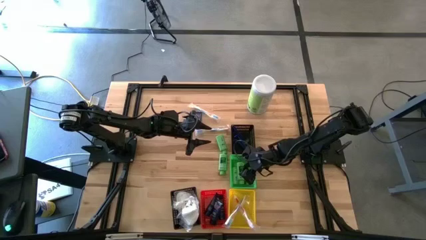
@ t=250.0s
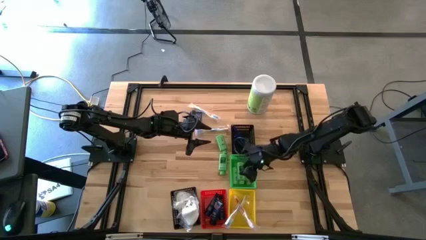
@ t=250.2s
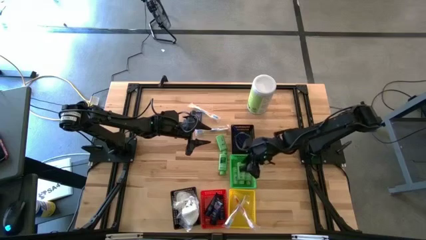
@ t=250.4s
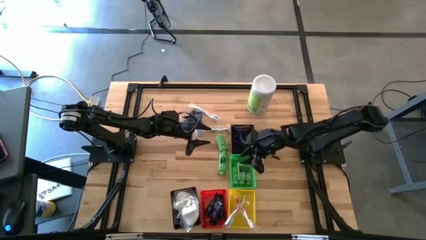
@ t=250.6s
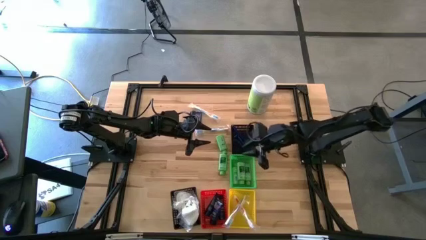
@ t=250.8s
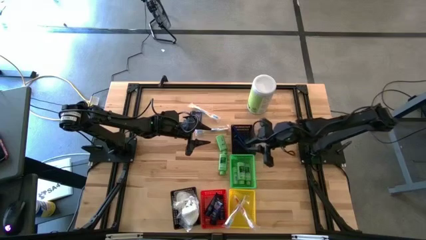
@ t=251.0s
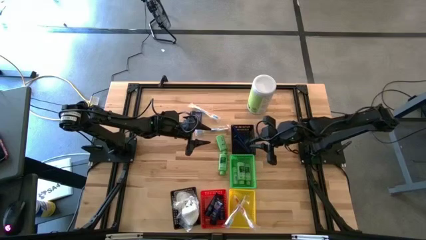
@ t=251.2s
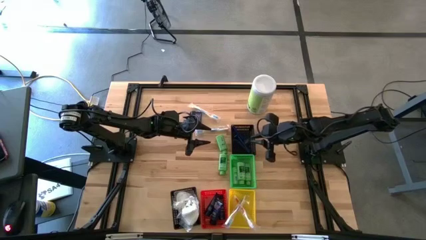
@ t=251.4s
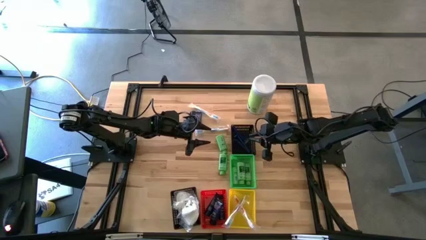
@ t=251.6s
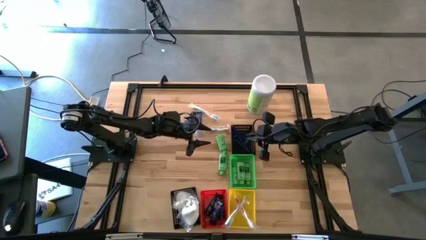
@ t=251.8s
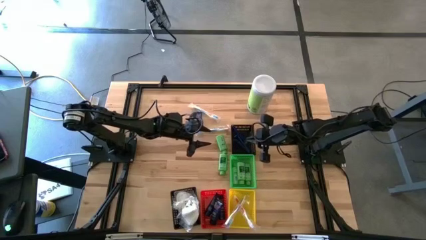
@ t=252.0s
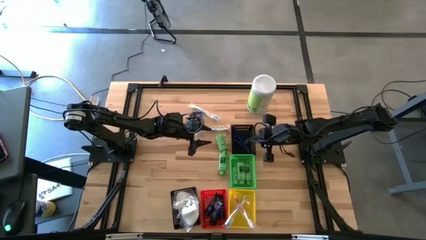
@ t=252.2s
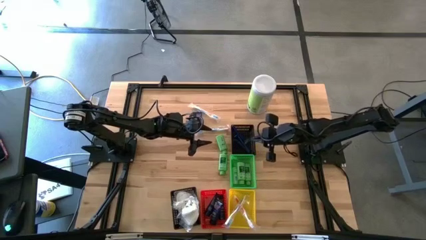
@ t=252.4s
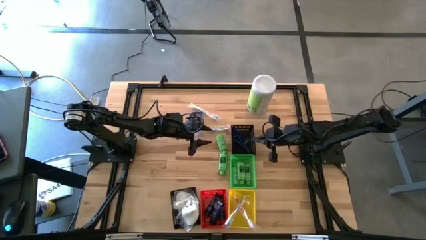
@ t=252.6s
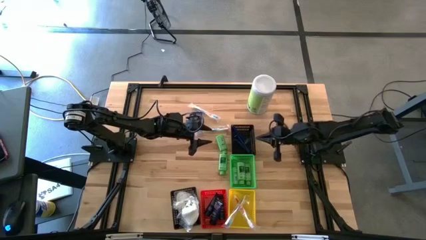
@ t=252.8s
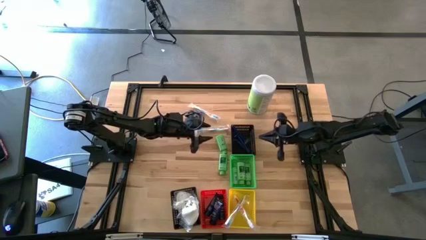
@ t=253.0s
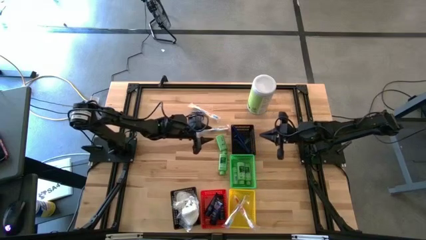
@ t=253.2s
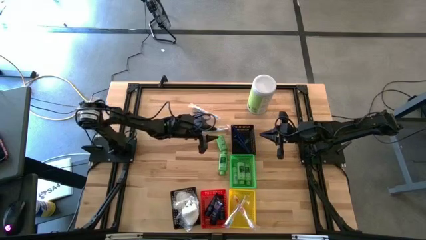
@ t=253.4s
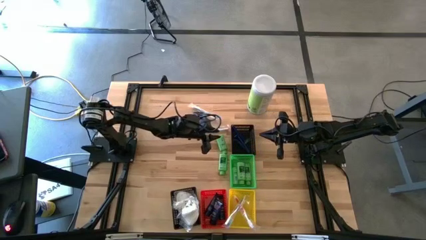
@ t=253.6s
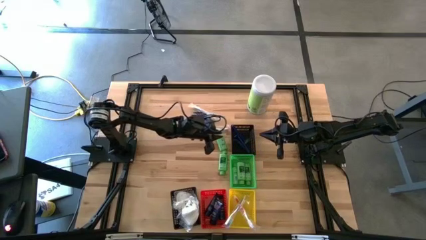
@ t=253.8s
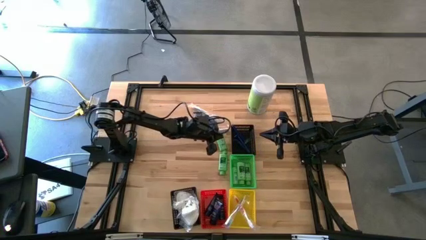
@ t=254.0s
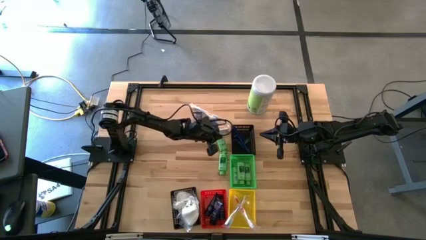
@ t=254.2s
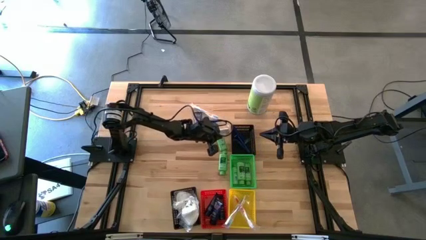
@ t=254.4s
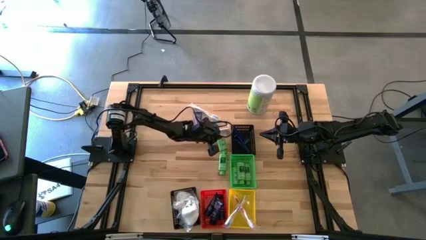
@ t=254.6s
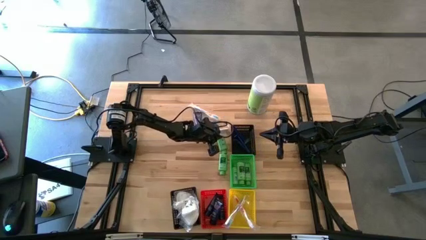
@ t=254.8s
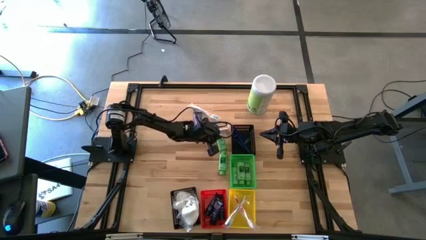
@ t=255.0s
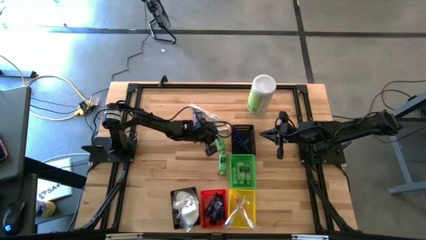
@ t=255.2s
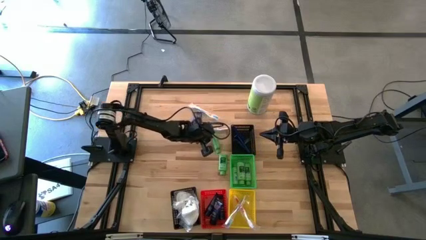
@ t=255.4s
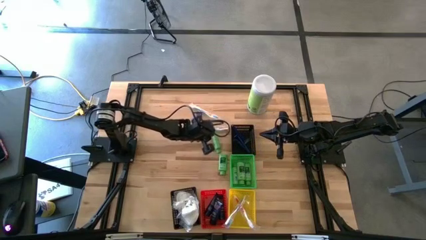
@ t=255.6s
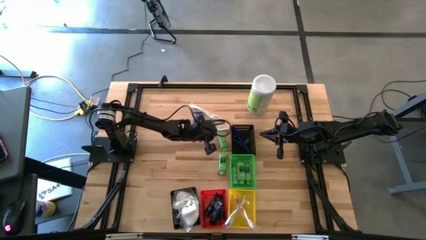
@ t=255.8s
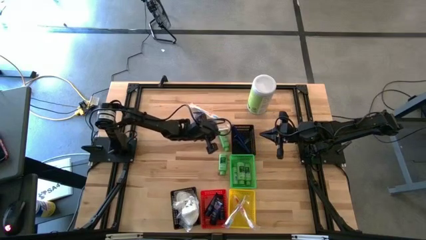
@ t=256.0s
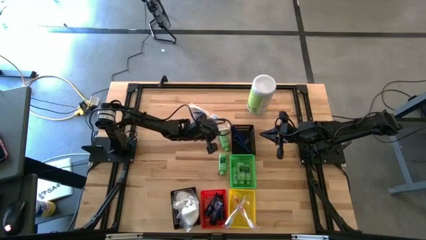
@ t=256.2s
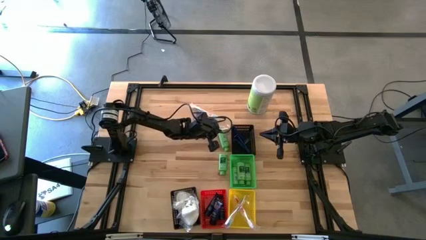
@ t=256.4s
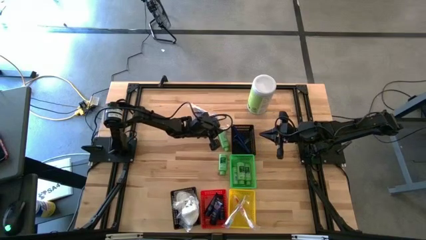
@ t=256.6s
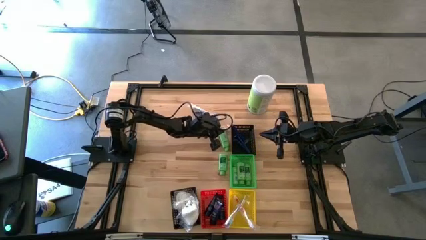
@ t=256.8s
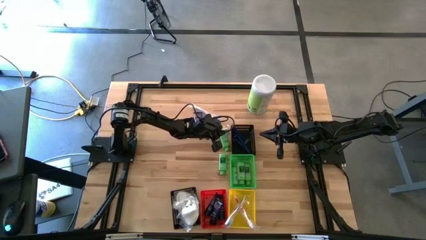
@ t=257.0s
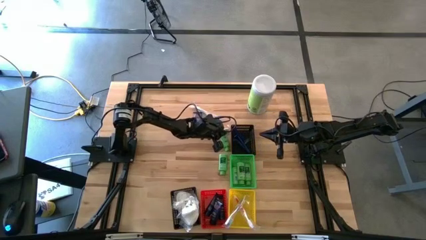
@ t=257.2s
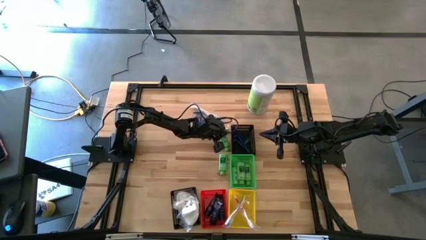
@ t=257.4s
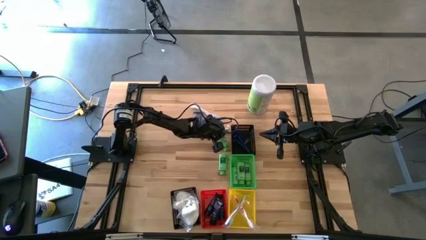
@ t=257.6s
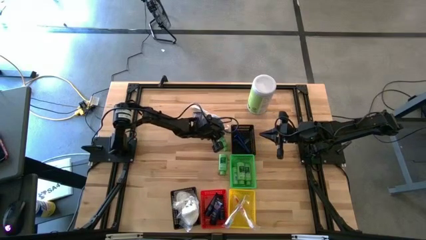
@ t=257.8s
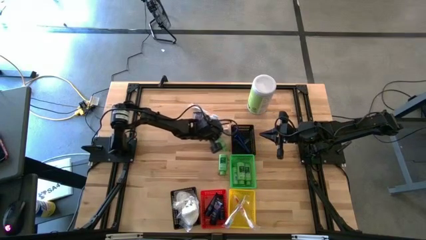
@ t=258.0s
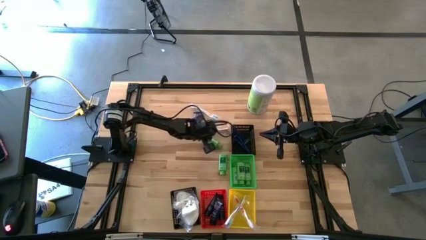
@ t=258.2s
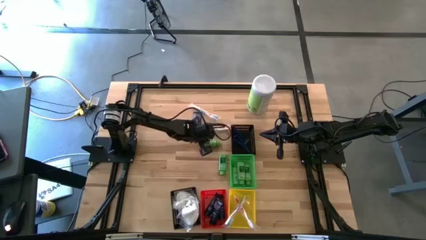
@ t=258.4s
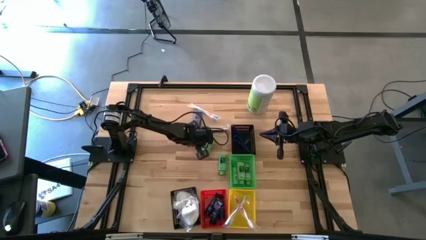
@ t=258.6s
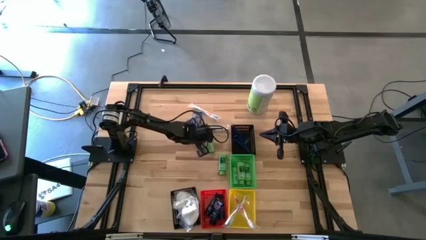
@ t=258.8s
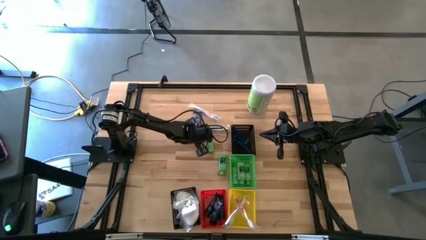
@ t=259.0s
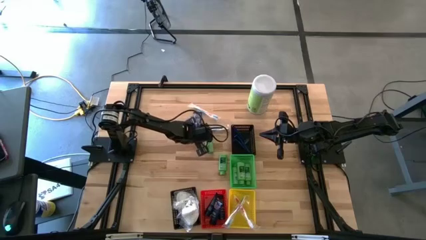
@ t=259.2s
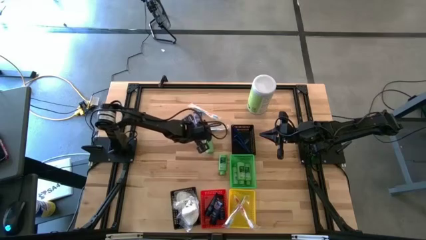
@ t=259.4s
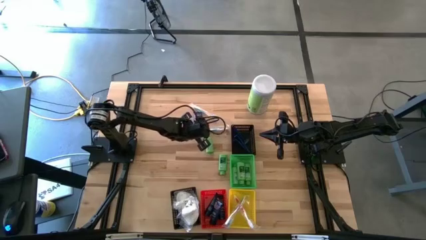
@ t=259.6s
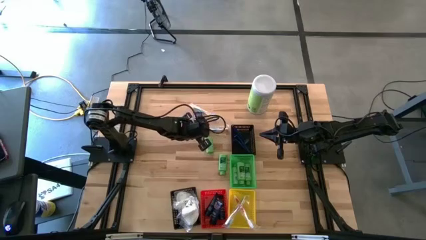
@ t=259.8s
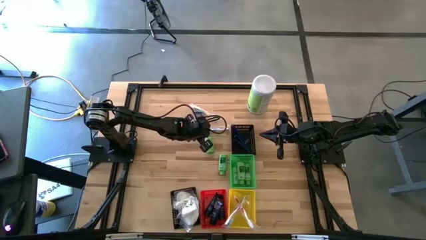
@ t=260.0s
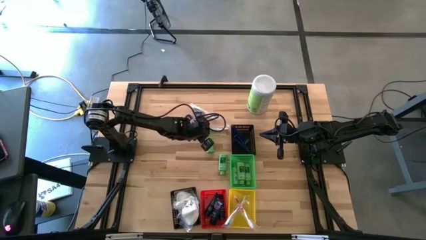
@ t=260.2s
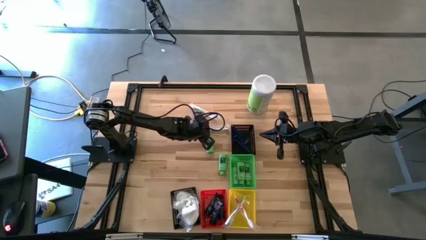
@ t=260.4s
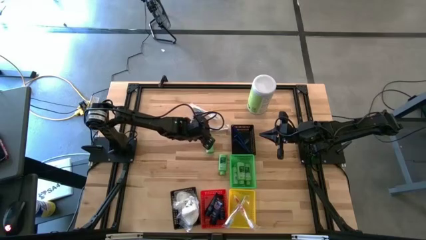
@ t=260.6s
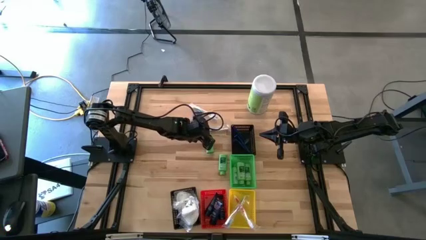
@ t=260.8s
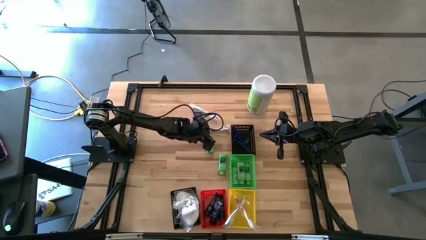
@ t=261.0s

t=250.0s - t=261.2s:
Task: Pick & Place Travel size toiletries
Put the green shampoo into the green bin

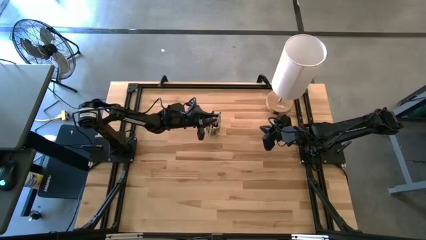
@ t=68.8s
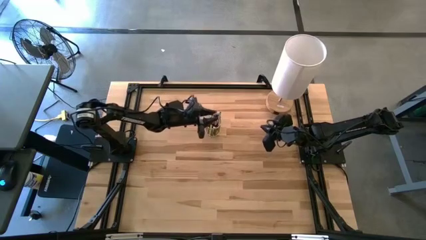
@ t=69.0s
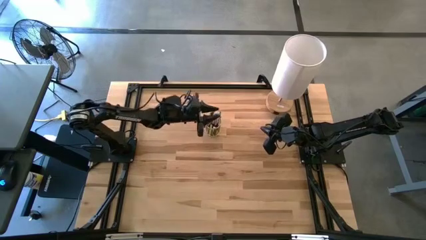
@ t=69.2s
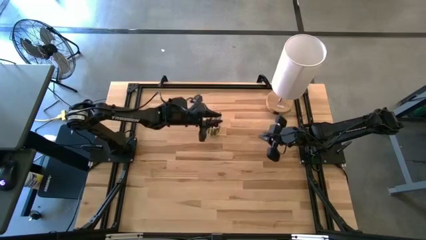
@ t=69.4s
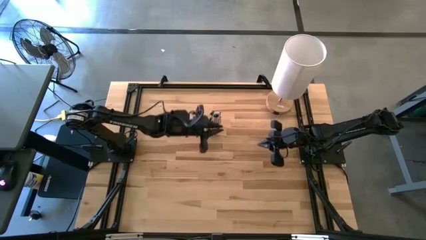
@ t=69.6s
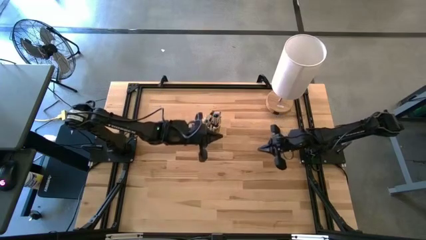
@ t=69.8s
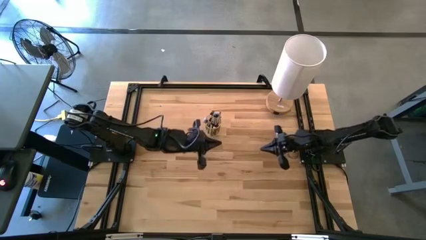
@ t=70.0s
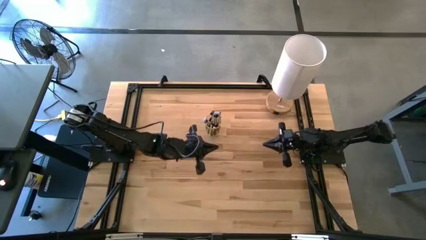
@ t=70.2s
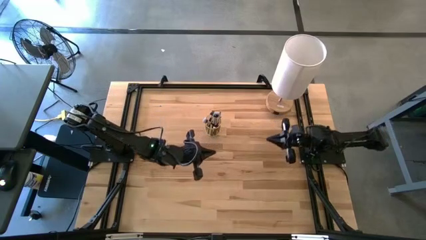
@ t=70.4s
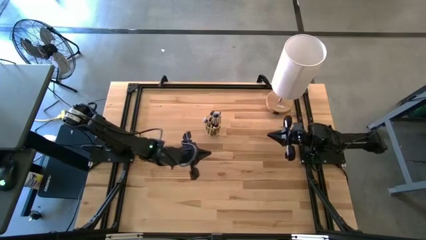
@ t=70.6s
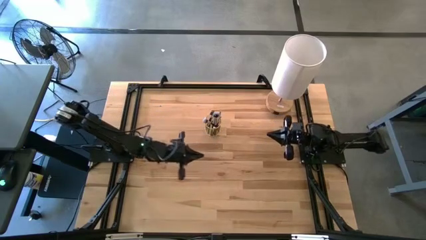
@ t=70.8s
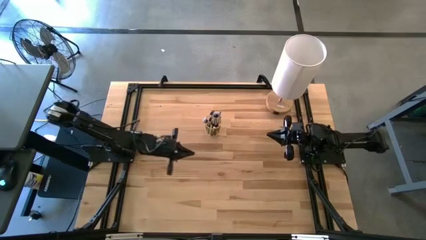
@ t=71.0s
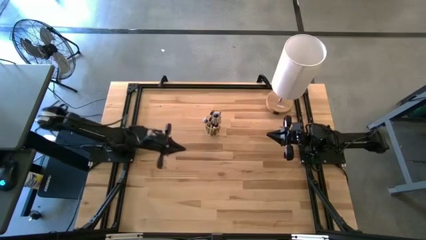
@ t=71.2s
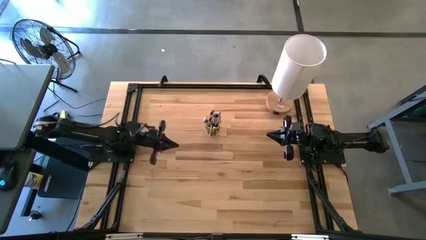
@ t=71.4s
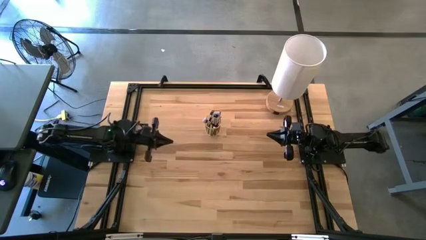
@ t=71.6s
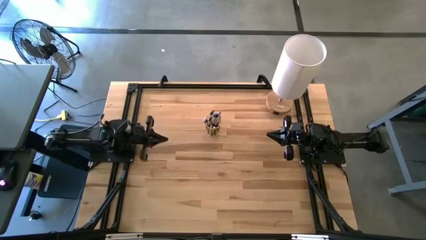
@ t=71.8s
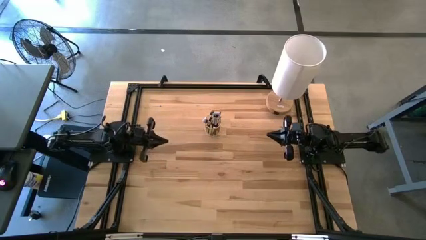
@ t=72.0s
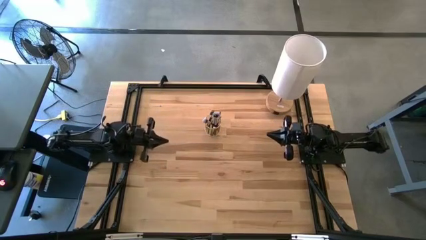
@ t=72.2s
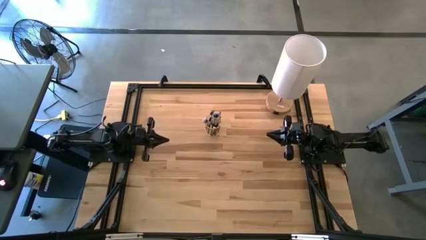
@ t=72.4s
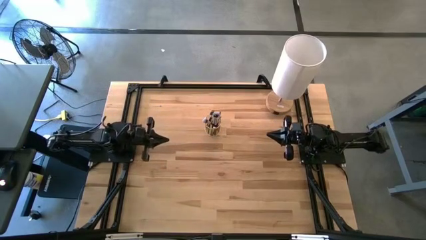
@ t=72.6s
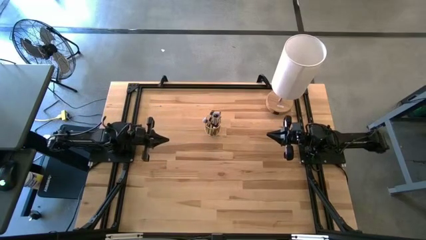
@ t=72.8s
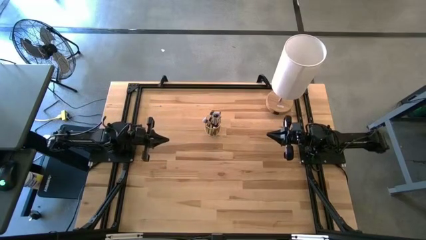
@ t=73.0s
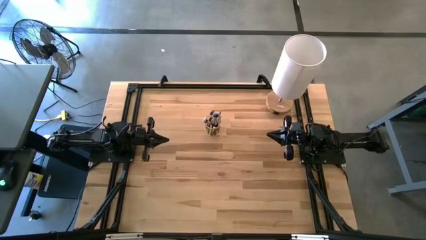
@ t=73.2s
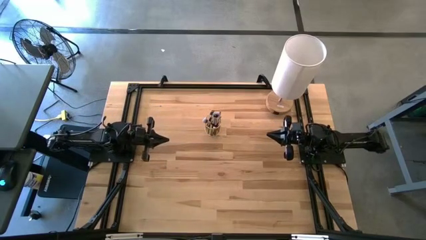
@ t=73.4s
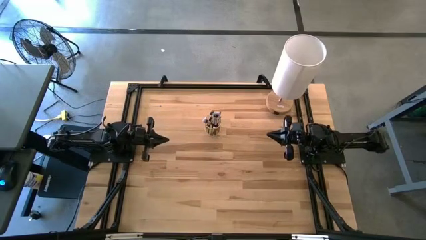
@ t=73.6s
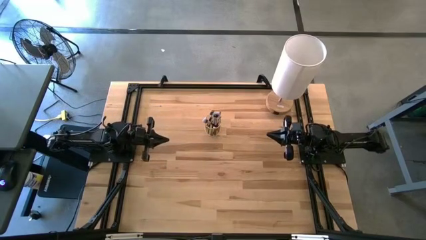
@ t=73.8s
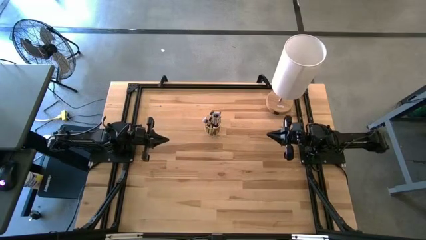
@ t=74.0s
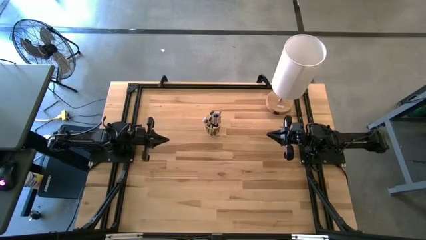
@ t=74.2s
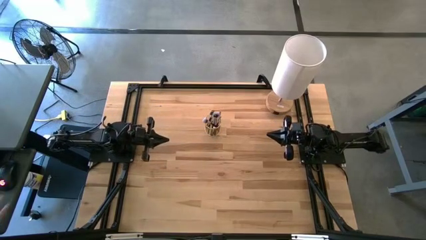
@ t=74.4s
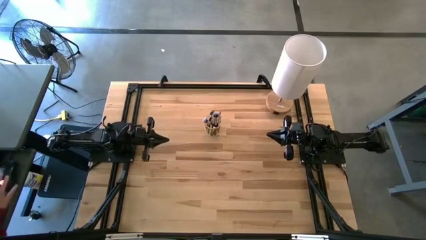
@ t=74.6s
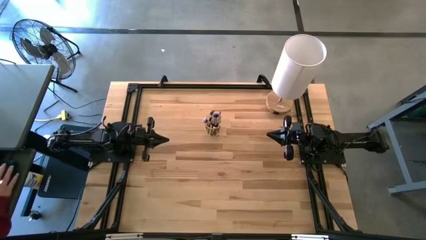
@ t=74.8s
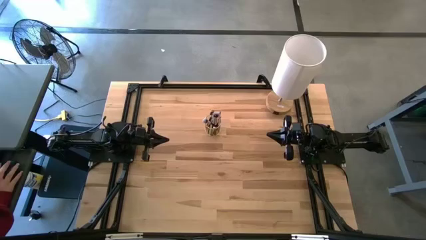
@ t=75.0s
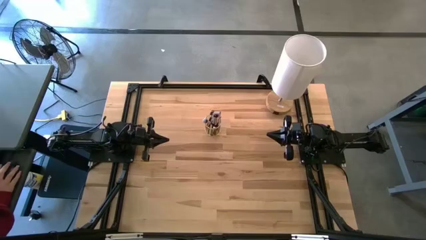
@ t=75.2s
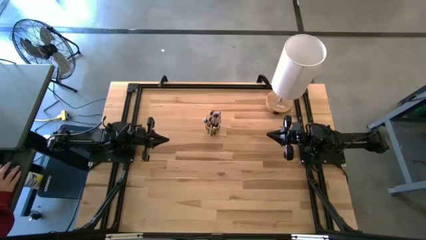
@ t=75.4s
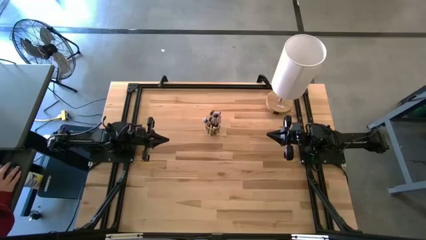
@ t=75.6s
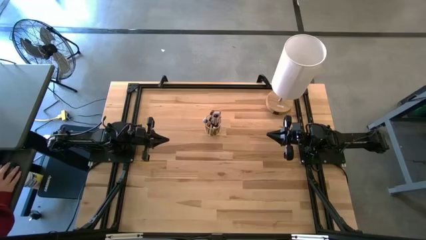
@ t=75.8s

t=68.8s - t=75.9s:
Task: Put items in baskets/containers
Return to Home Position
